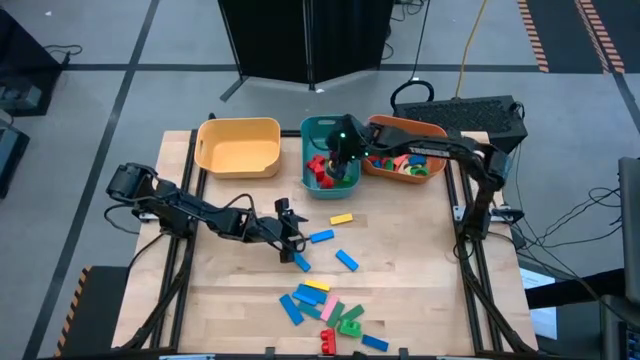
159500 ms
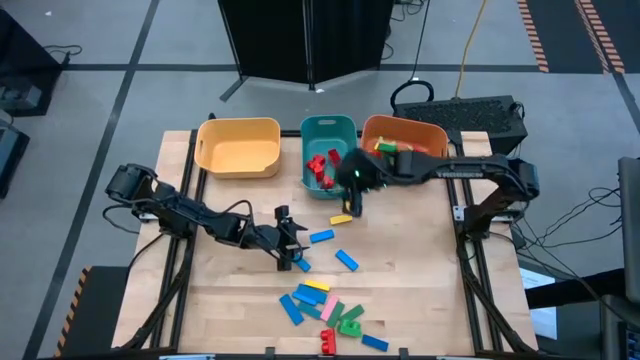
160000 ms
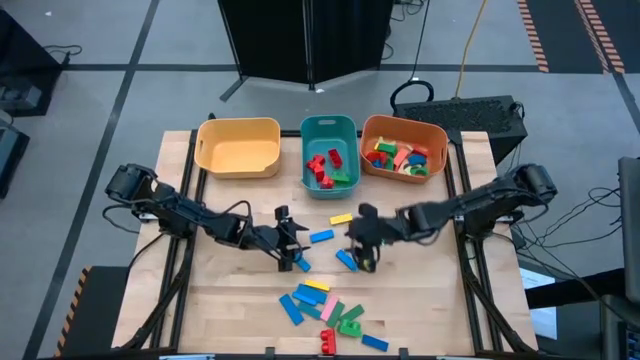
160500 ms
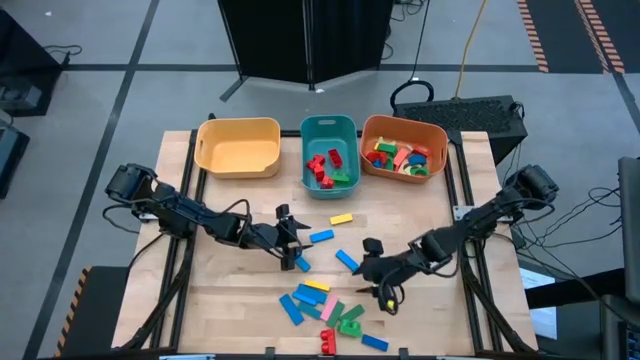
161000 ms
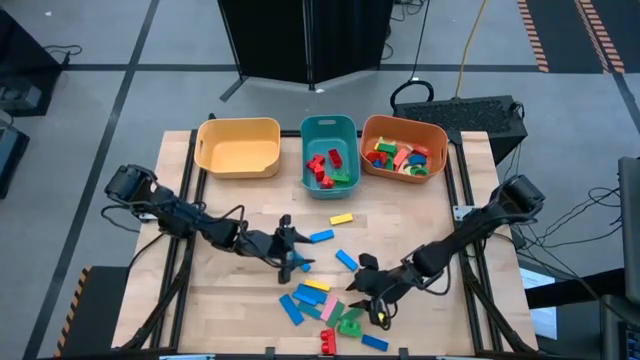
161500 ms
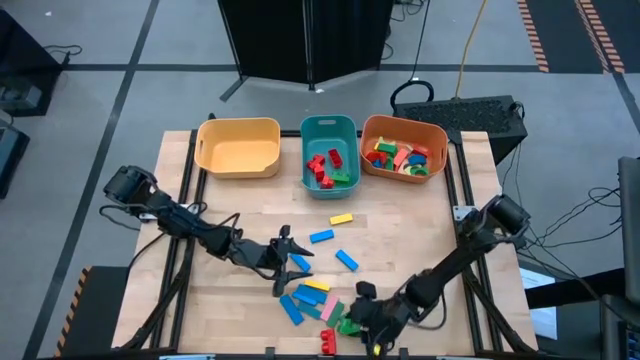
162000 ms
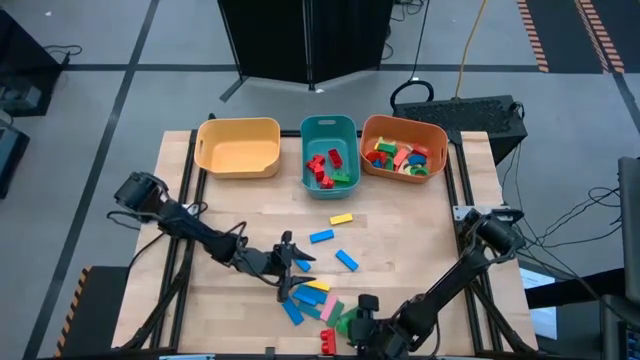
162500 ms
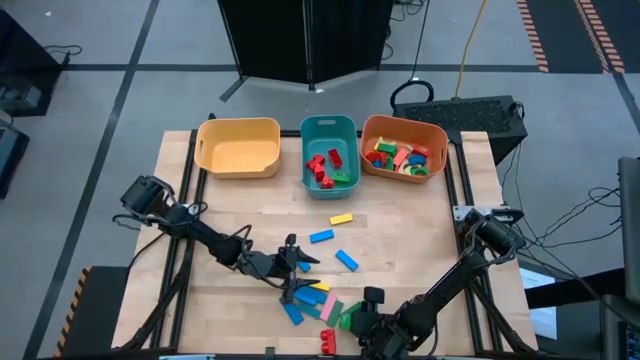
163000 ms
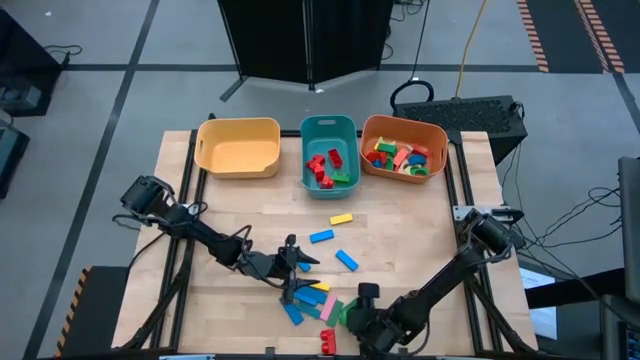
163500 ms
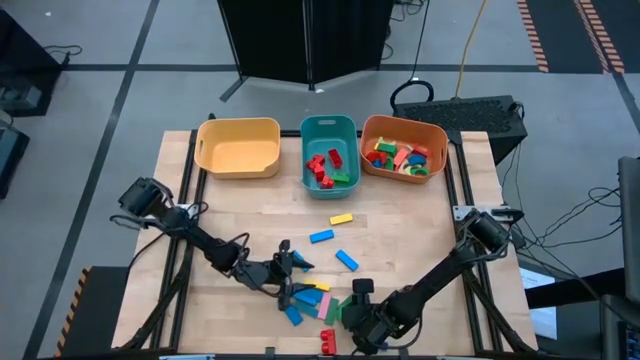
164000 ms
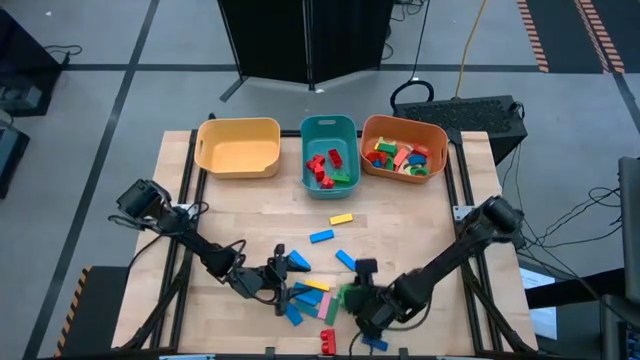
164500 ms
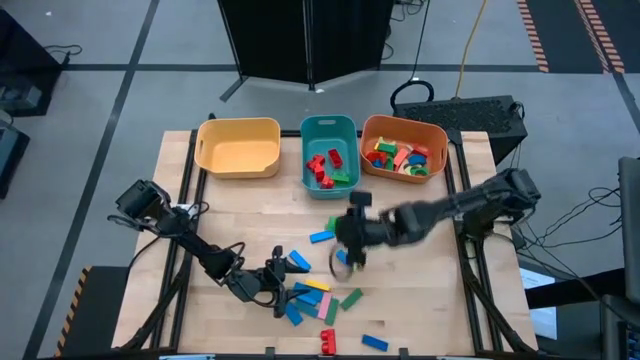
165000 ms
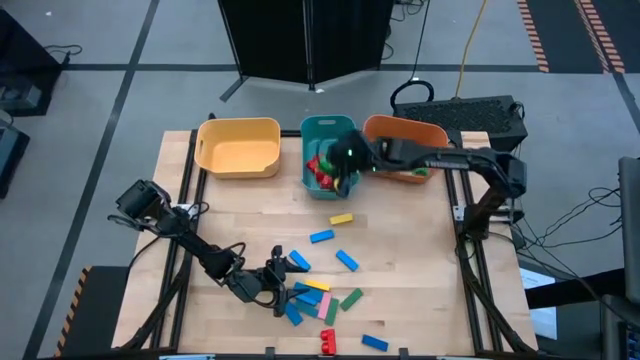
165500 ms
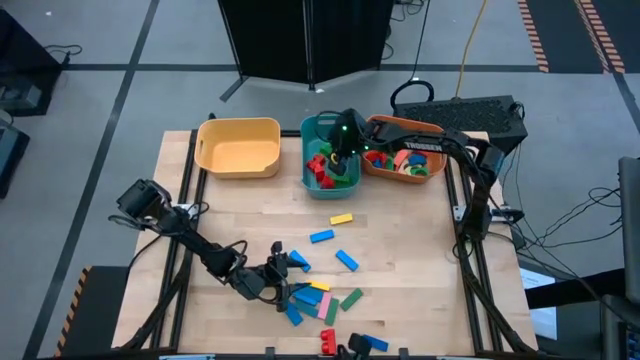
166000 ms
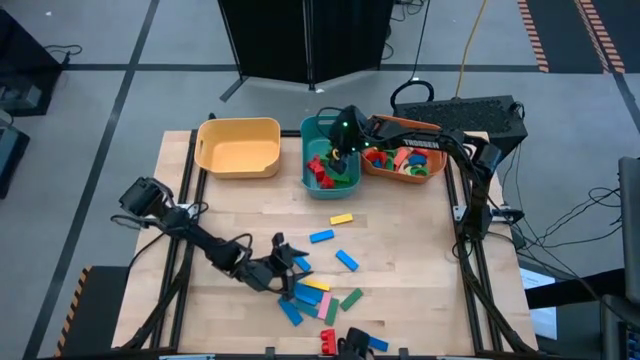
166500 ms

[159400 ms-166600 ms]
Task: Sort blocks by size
Put the green 2 stud game piece into the blue bin

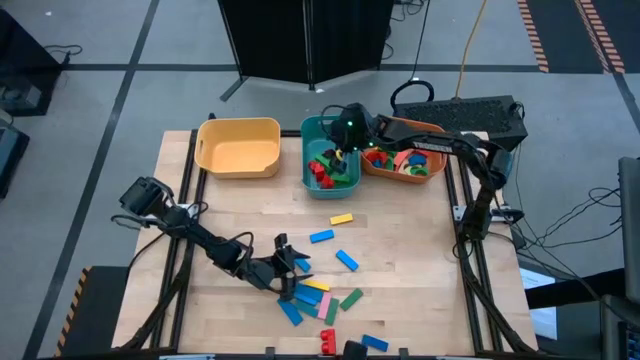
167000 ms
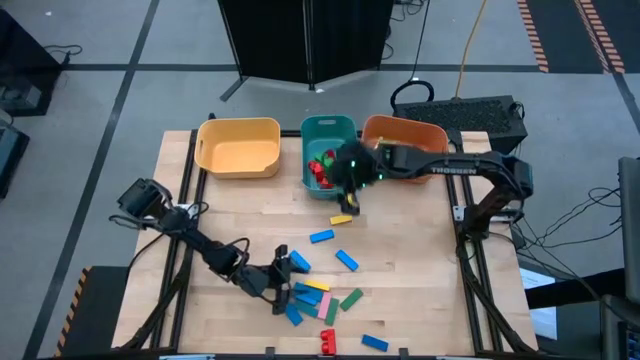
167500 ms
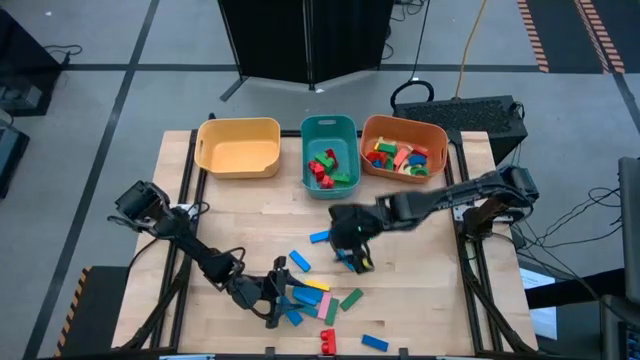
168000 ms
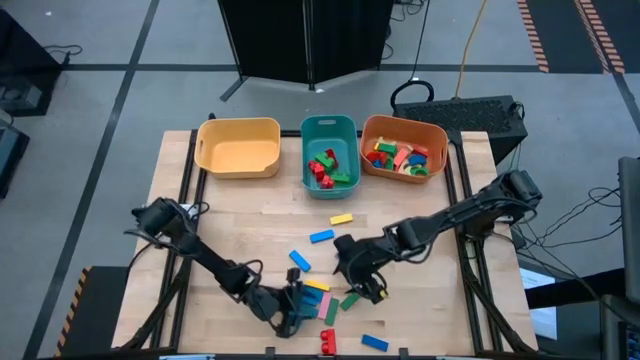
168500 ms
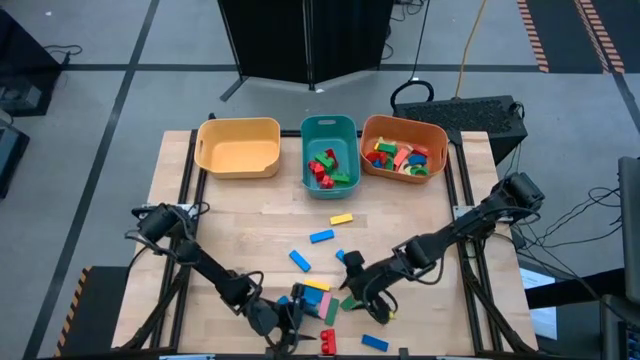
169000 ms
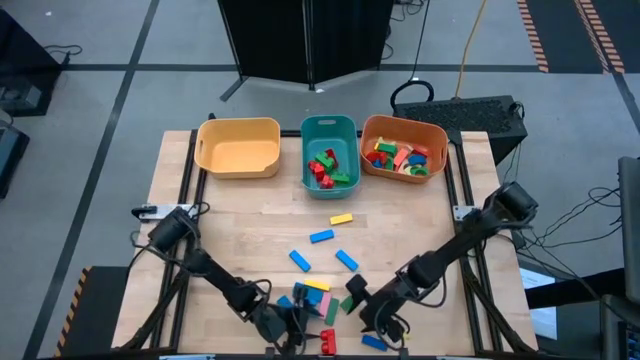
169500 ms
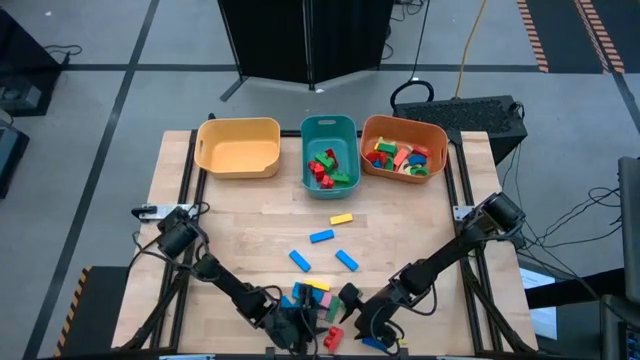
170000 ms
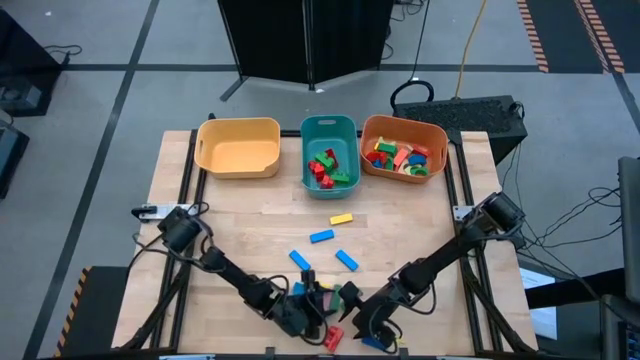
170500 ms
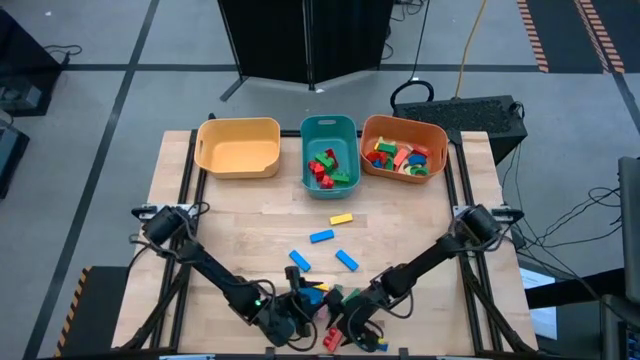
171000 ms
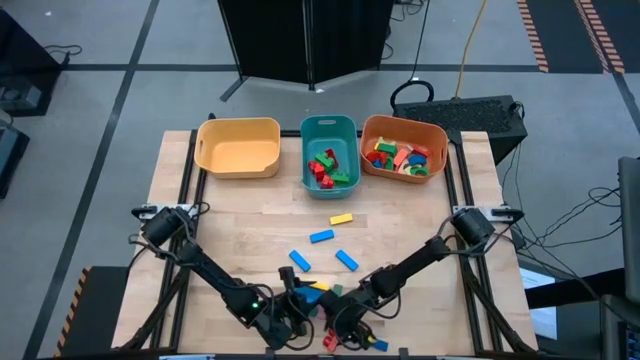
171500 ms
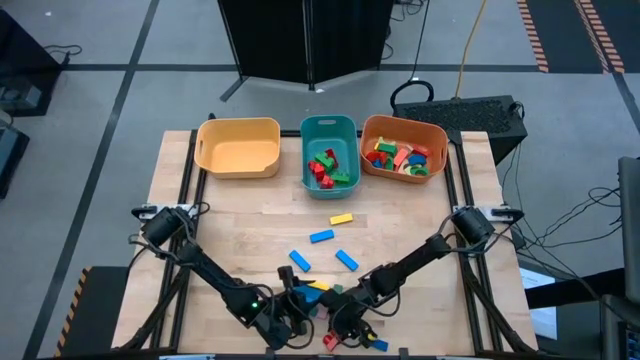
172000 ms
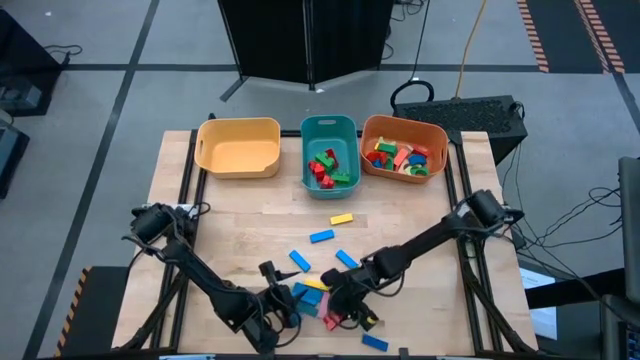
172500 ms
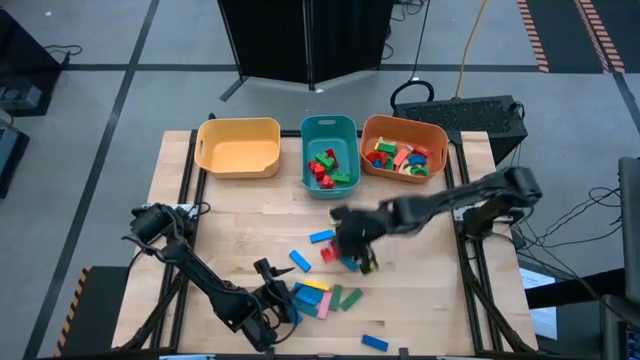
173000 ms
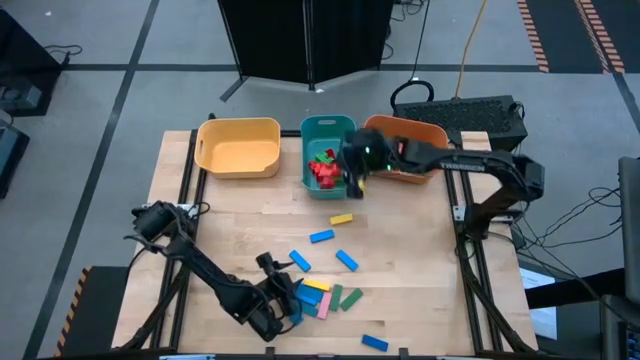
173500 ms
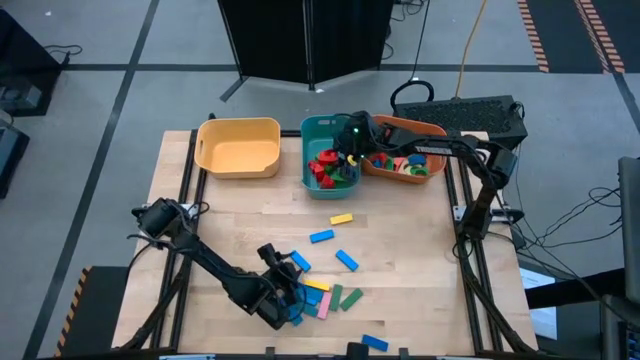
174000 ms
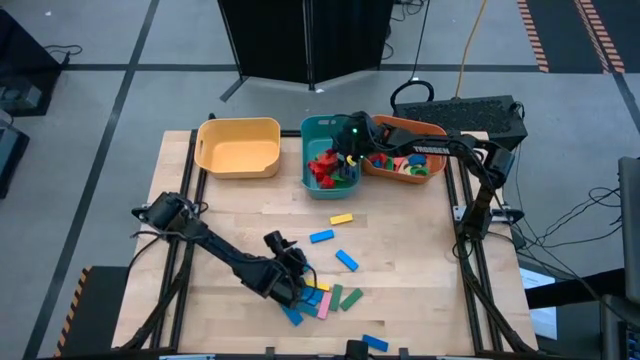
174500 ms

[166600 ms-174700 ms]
Put the red 2 stud game piece into the blue bin

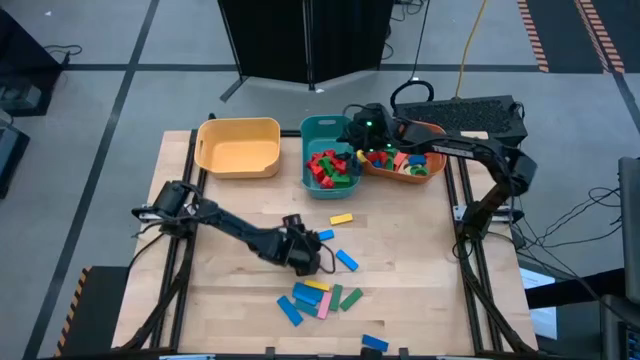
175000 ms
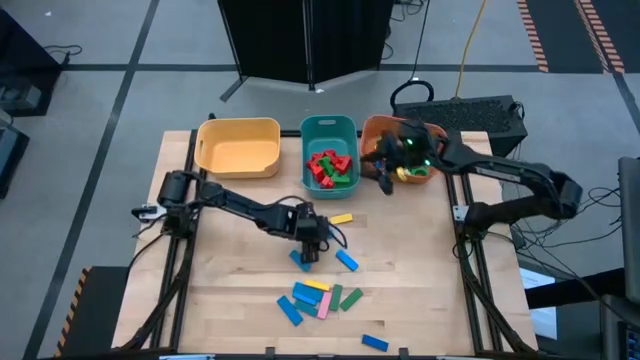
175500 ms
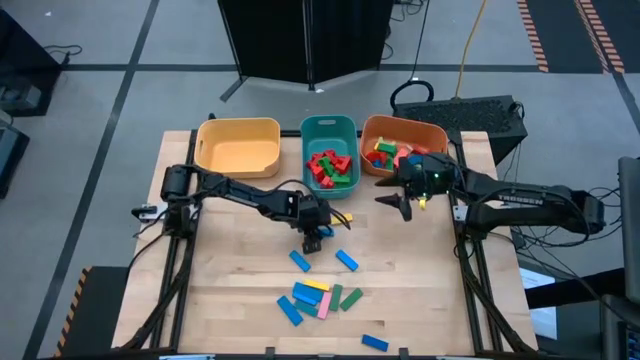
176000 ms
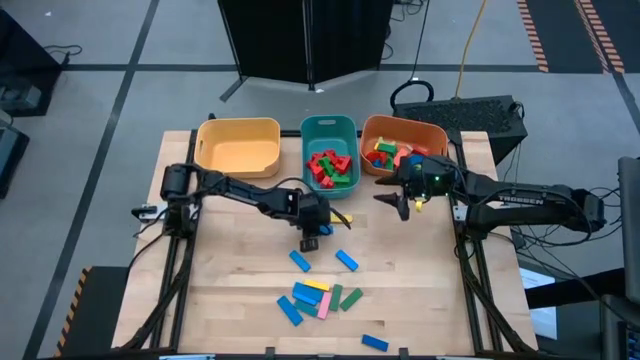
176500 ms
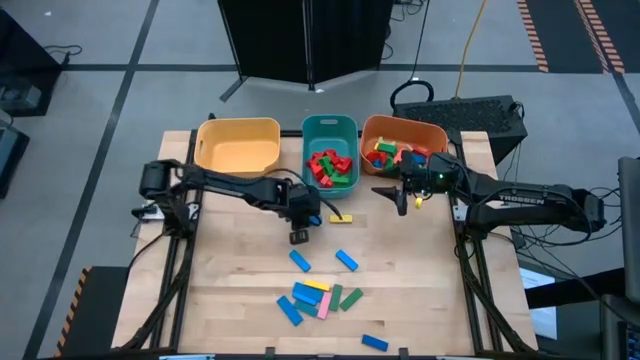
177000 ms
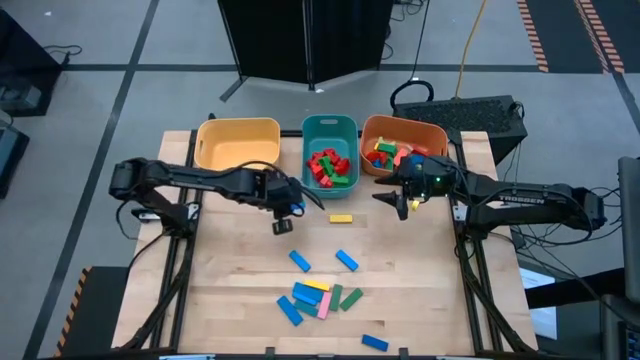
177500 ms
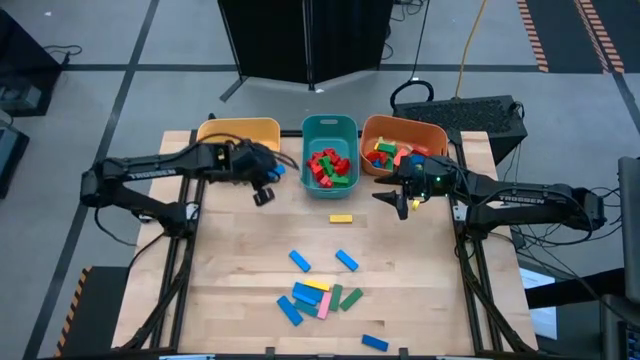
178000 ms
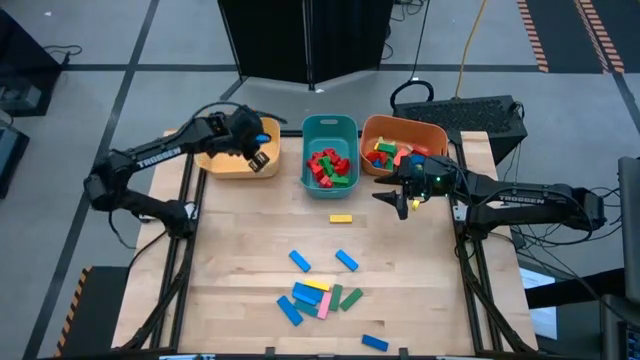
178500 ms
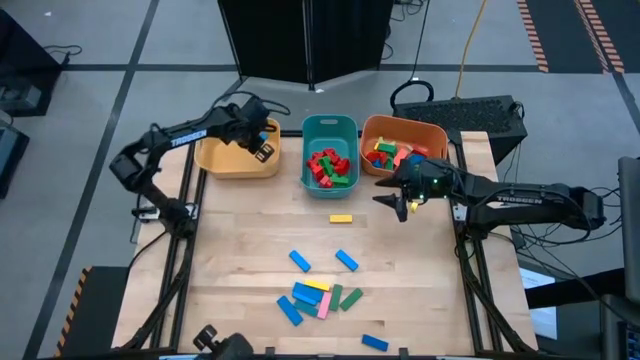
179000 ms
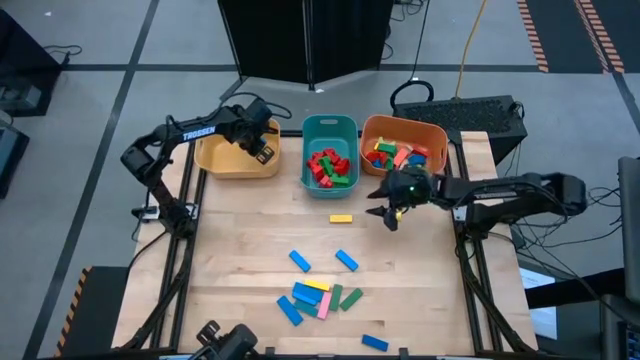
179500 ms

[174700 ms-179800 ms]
Put the blue rectangle block into the yellow bin

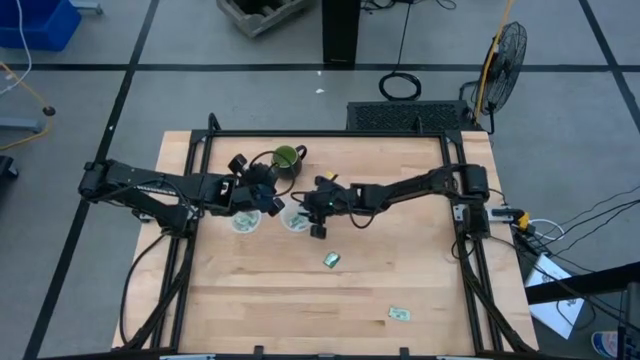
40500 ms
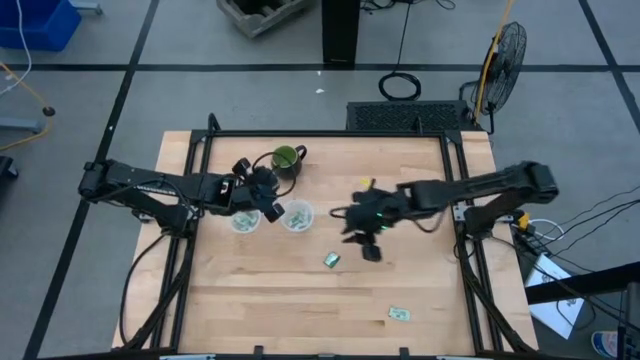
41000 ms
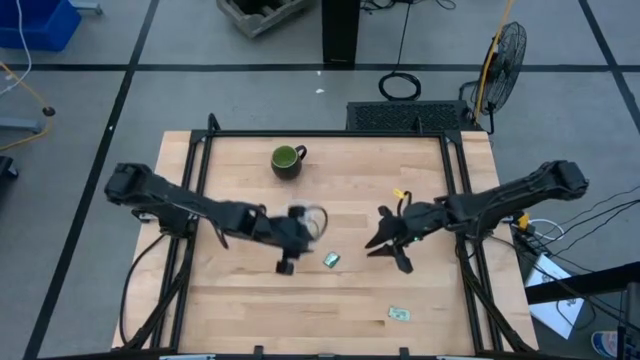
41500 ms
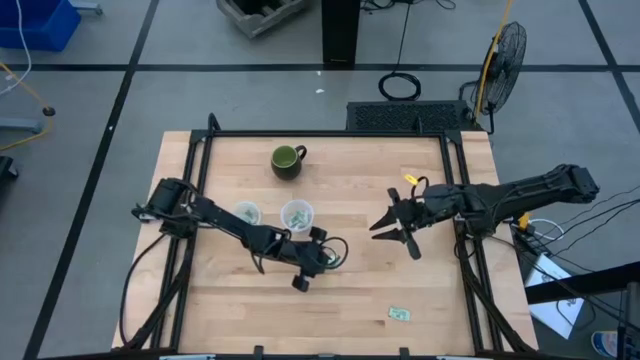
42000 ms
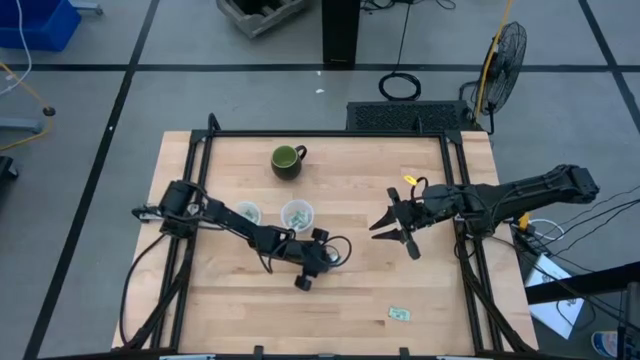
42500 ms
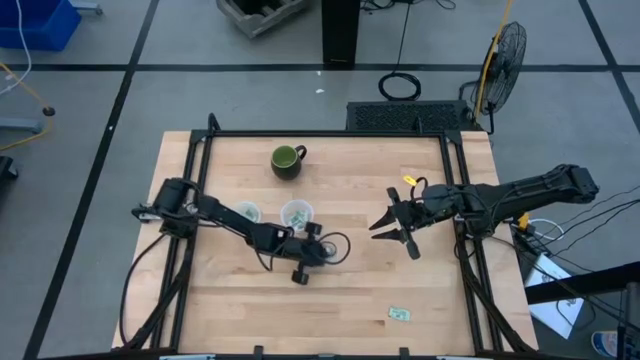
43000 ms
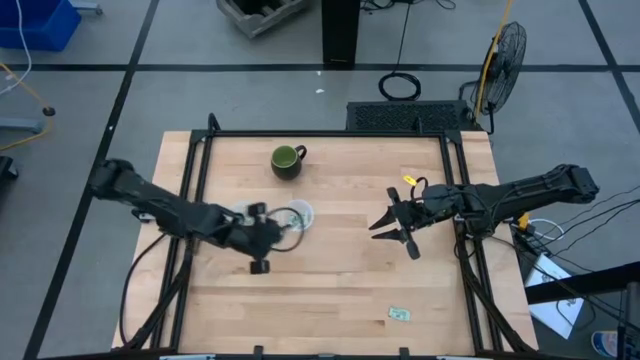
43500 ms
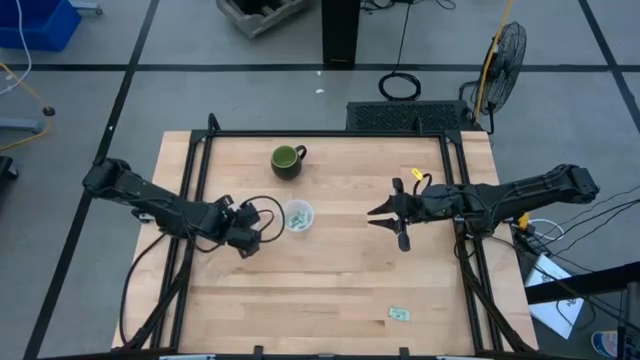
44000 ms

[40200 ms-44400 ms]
Task: Pick and place Stevia / Truvia into bins
Put the stevia pocket in the left plastic container
